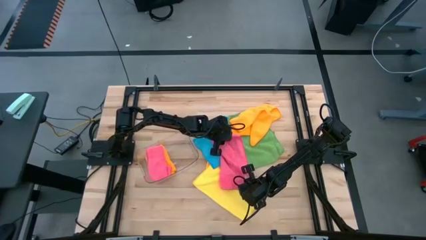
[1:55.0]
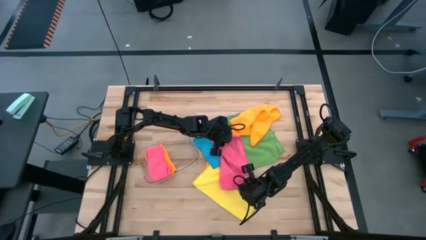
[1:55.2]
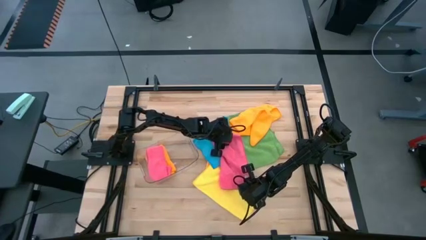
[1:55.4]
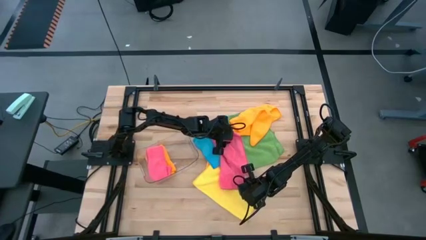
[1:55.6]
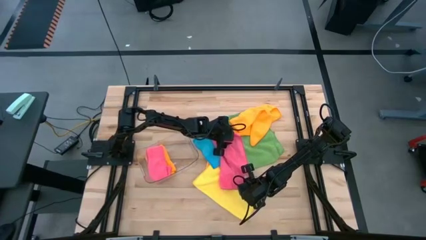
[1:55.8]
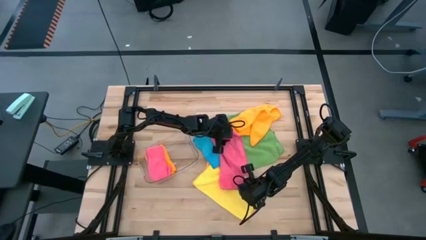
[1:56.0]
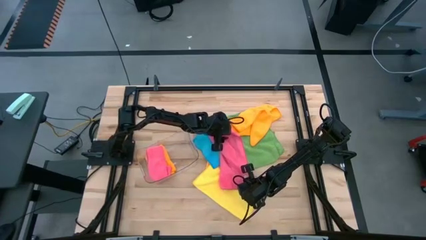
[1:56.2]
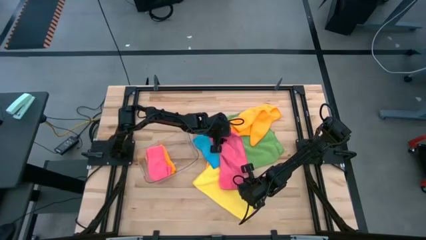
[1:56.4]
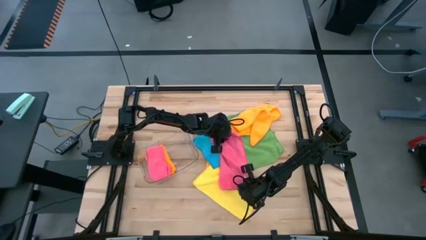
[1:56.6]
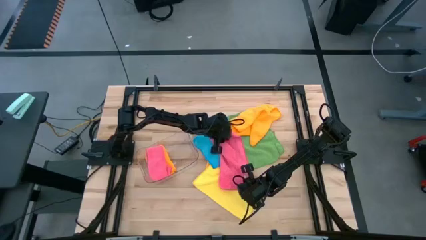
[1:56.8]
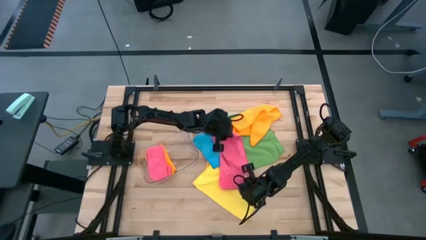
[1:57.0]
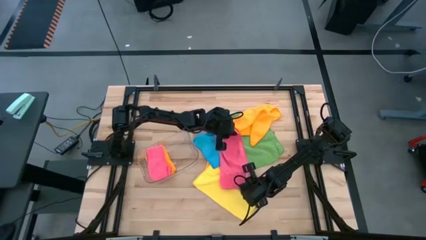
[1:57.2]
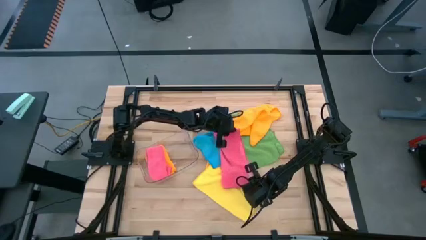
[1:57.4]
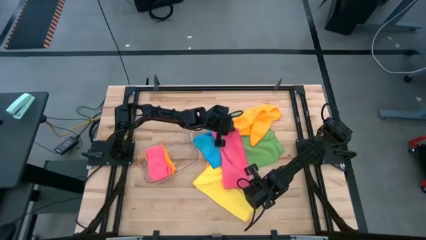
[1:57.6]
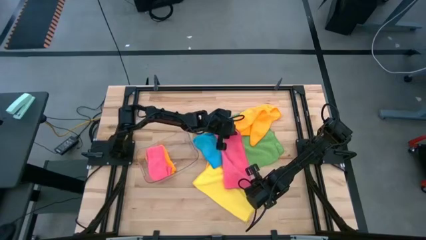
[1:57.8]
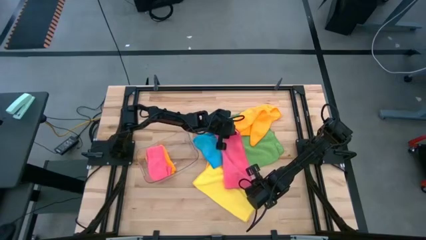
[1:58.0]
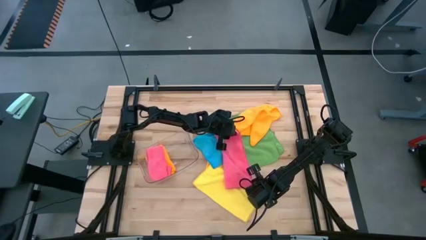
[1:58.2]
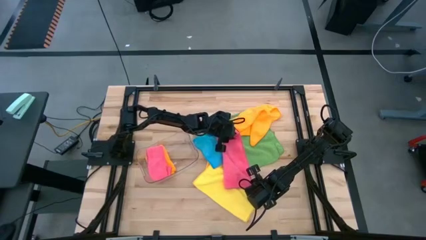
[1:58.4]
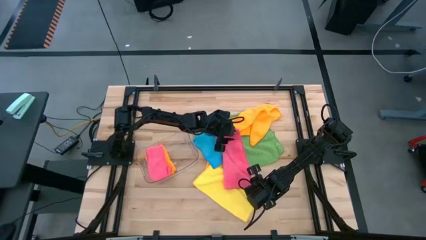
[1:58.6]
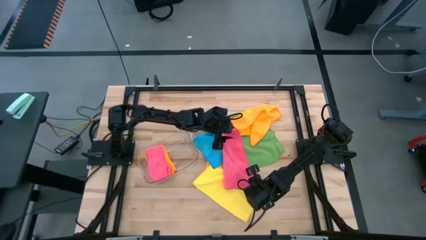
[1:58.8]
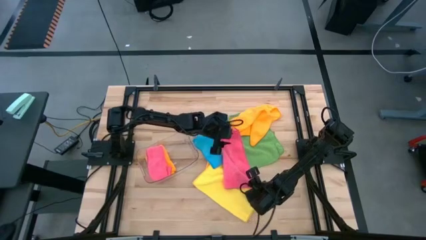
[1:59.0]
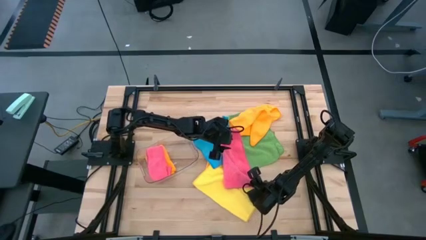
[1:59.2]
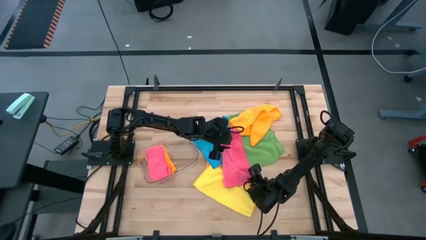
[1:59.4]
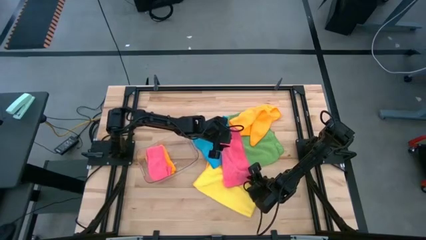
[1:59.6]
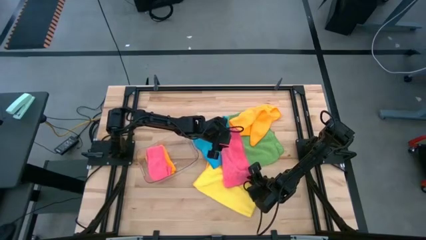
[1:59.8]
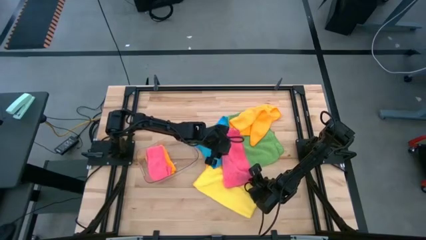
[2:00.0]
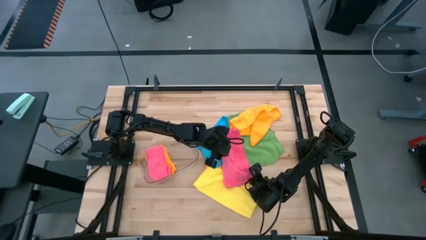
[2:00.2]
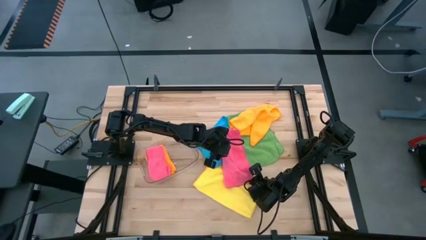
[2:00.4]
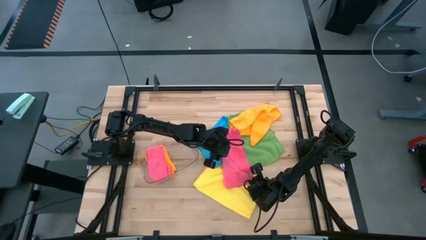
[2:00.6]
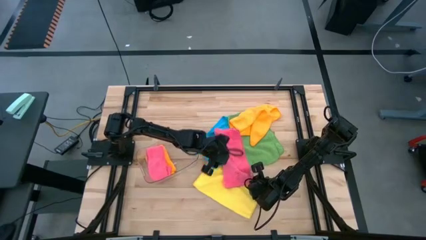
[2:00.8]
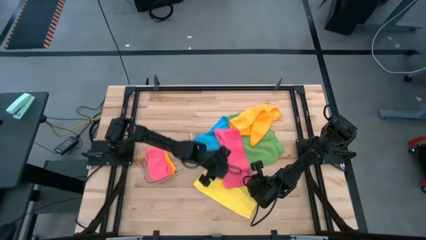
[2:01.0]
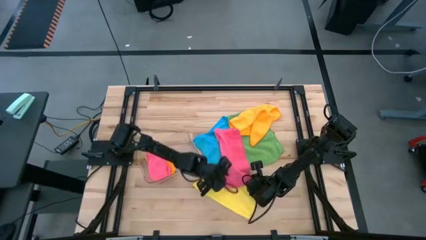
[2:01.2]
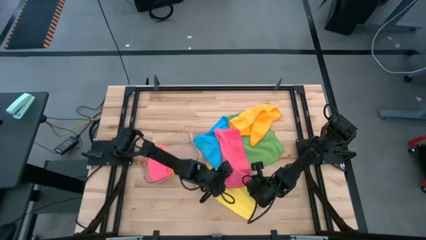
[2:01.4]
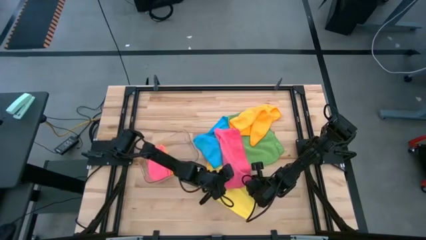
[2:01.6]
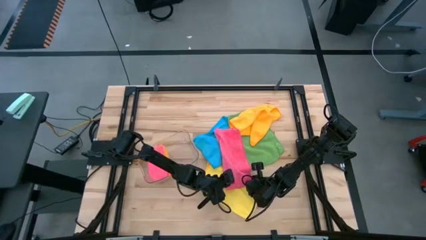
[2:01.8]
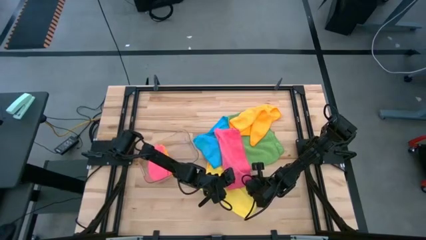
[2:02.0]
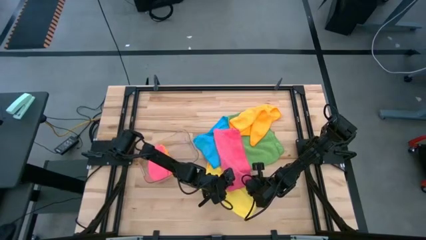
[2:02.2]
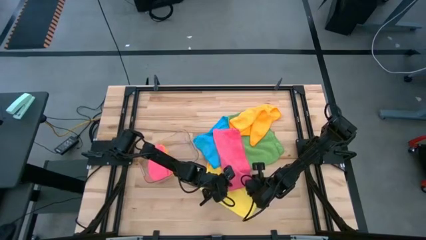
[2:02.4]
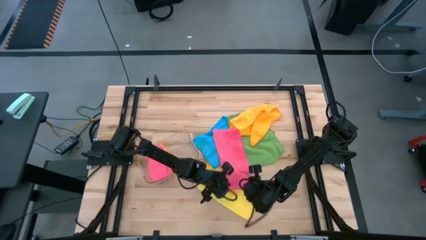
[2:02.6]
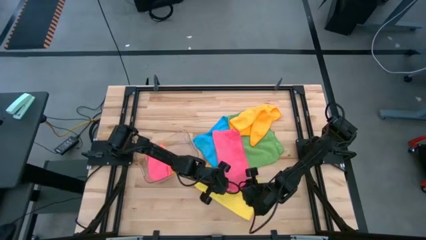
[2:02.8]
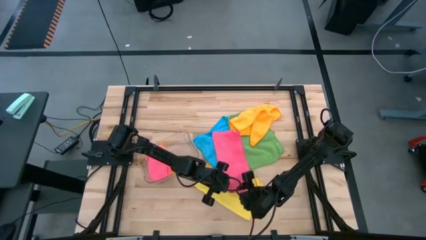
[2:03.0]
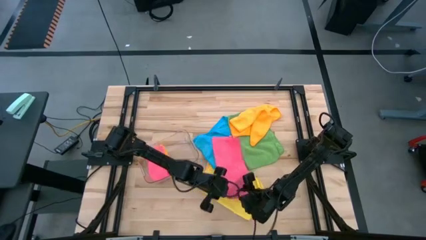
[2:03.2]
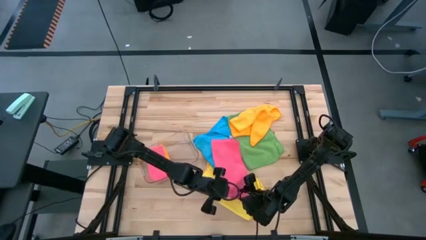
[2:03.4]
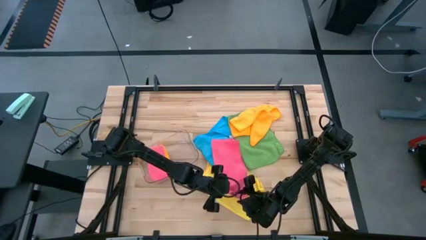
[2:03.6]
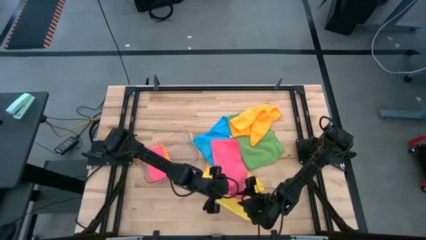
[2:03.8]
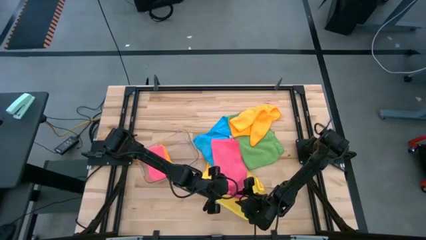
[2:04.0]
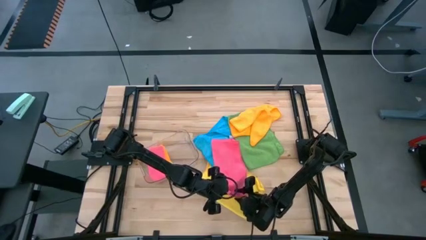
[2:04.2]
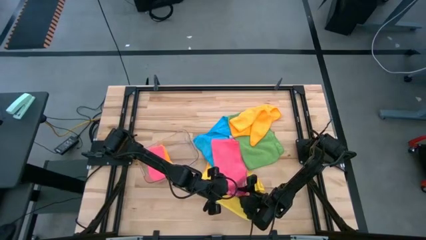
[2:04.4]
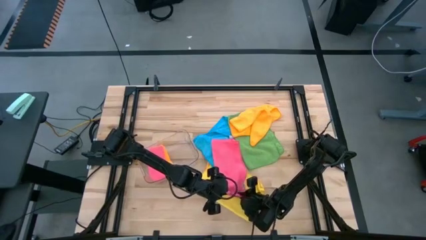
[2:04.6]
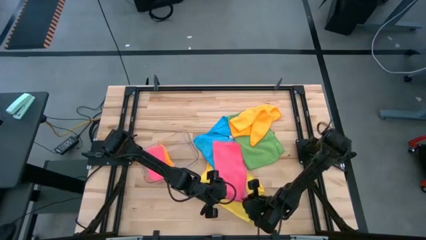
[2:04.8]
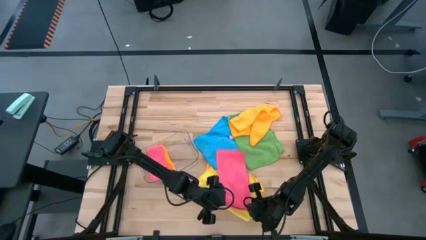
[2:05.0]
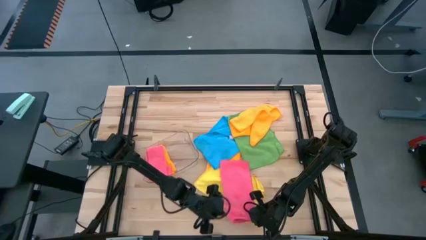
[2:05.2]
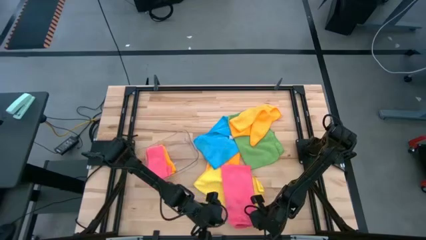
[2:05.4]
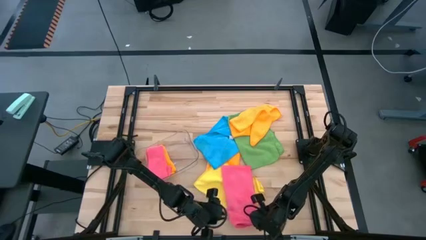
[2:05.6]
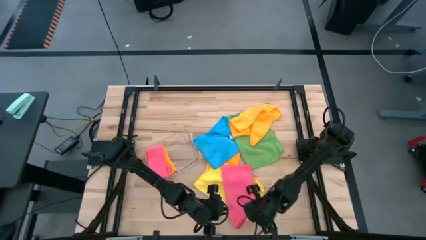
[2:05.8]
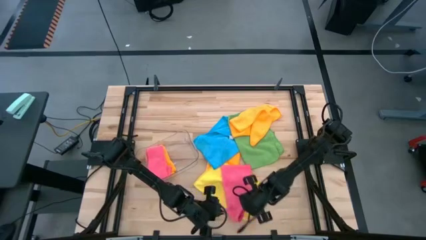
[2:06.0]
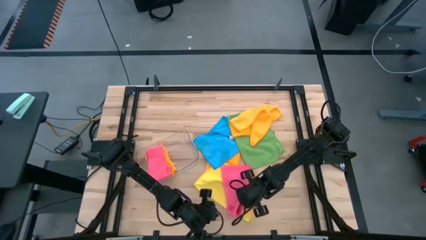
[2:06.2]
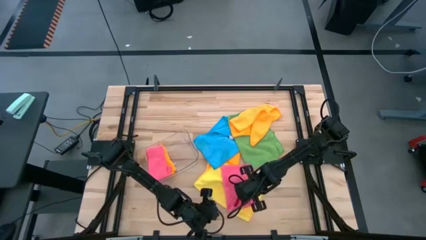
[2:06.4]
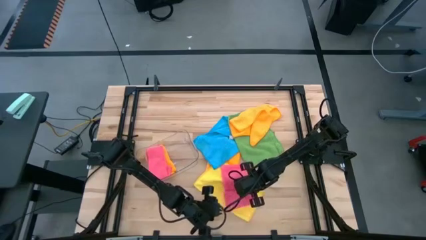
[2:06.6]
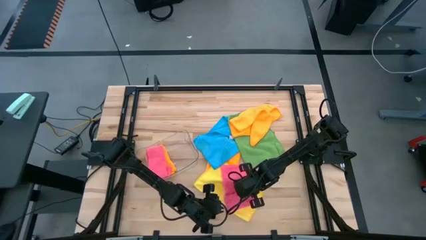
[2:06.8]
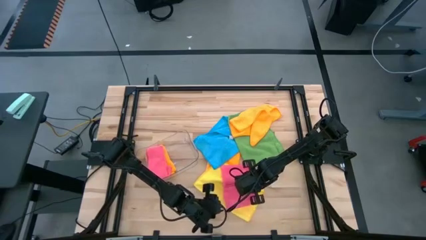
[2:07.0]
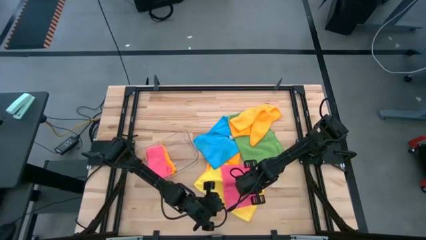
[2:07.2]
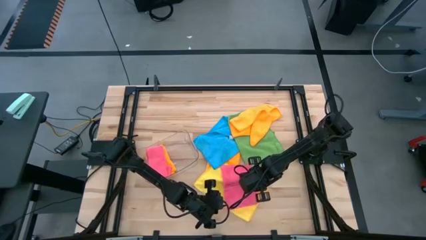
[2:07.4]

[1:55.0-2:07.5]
Task: Fold microfiber towels
Fold the pink microfiber cloth

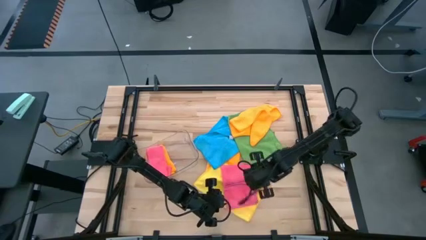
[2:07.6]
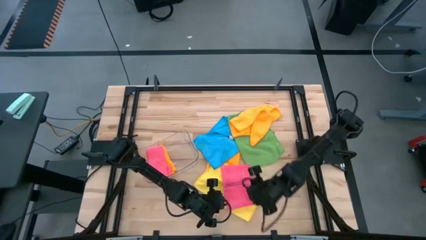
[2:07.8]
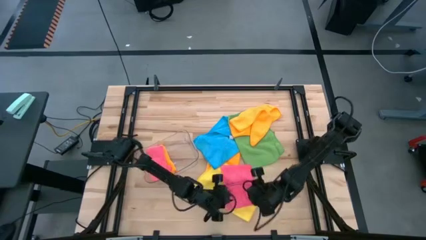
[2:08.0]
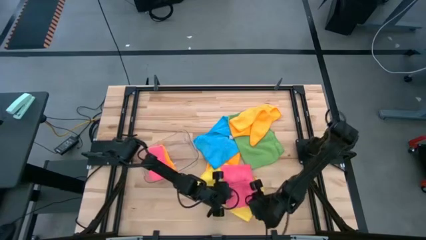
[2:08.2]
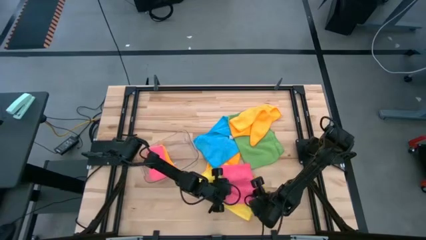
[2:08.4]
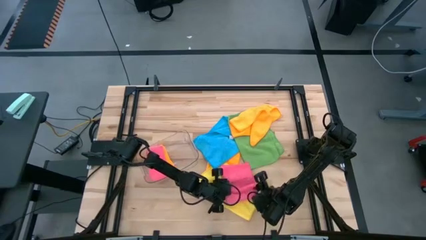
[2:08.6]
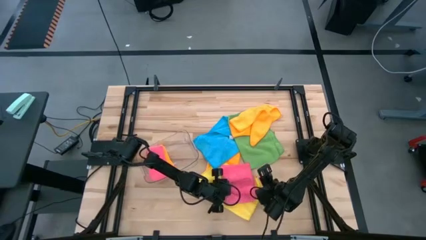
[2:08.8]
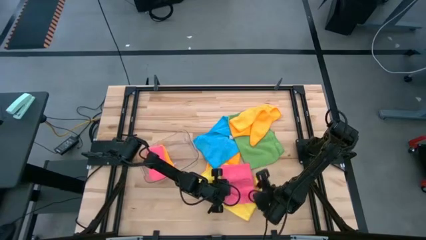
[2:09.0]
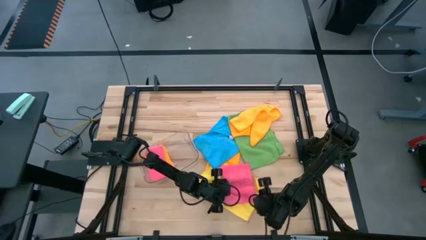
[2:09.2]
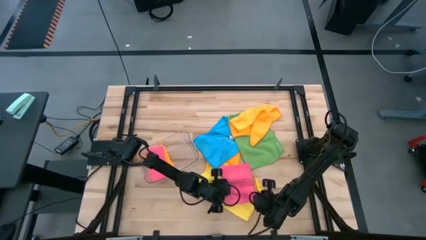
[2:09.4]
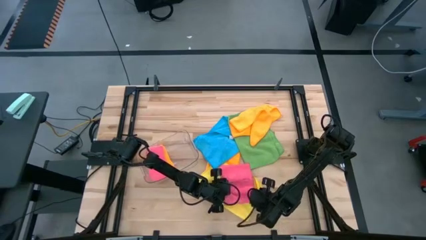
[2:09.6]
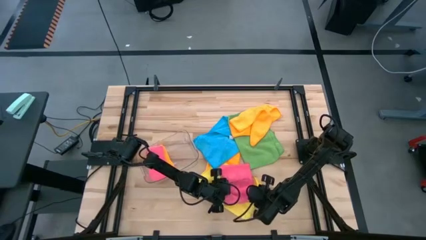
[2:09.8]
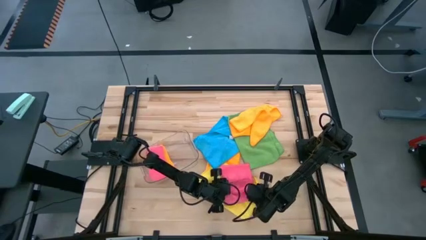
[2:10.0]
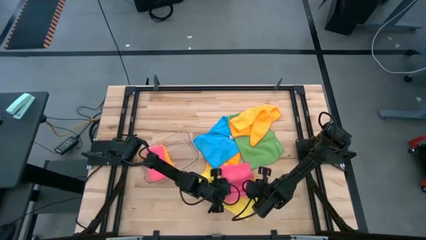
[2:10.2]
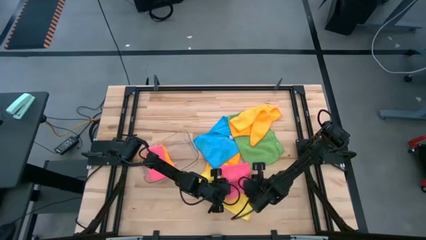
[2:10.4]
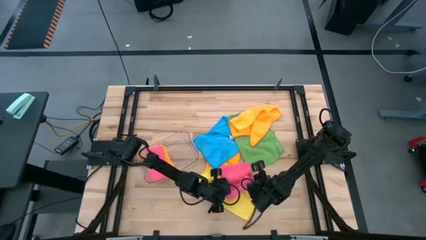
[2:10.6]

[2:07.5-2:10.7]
Fold the pink microfiber cloth
